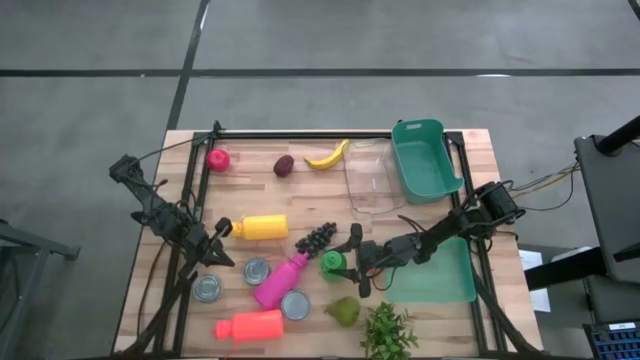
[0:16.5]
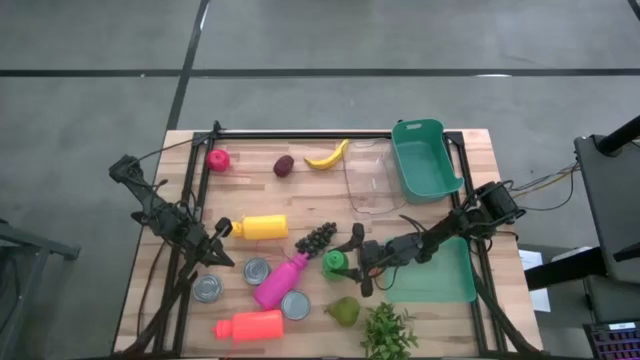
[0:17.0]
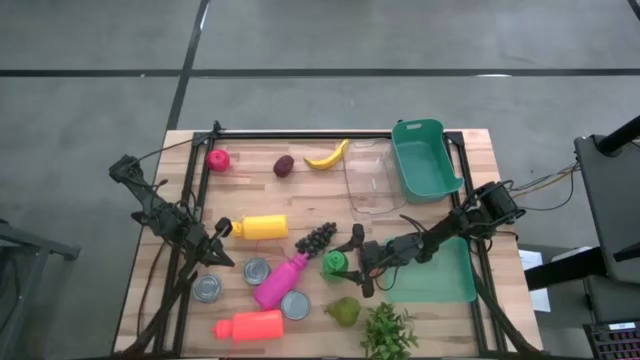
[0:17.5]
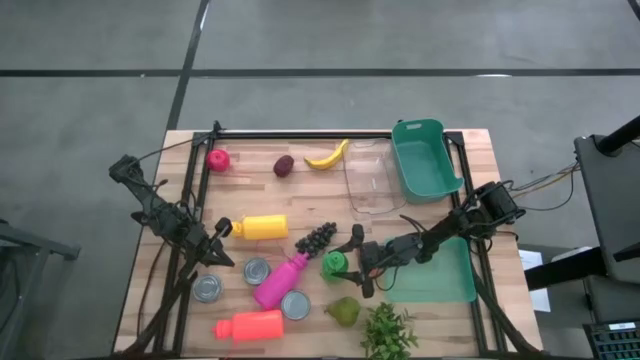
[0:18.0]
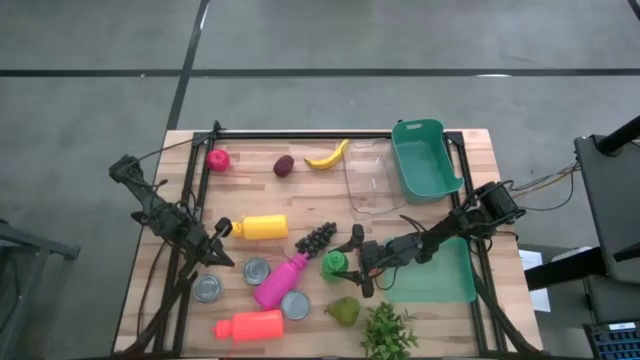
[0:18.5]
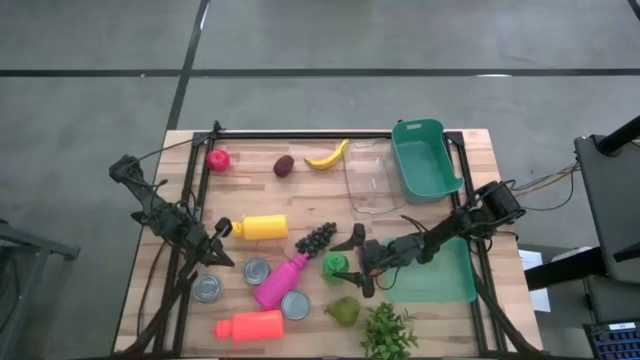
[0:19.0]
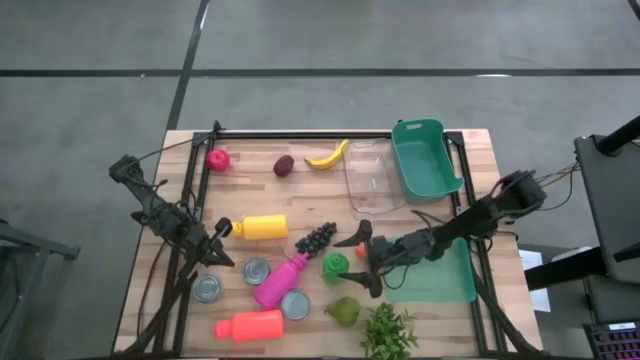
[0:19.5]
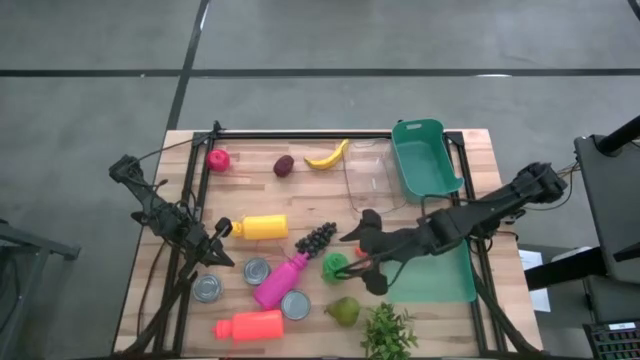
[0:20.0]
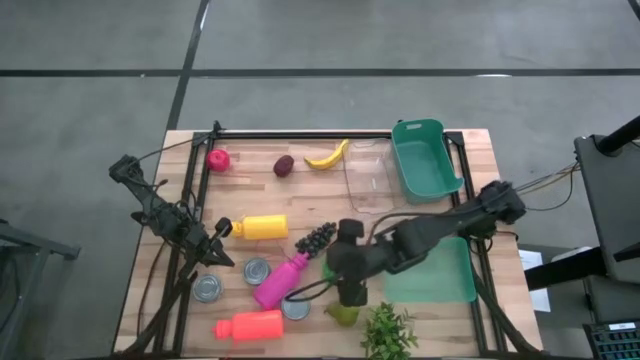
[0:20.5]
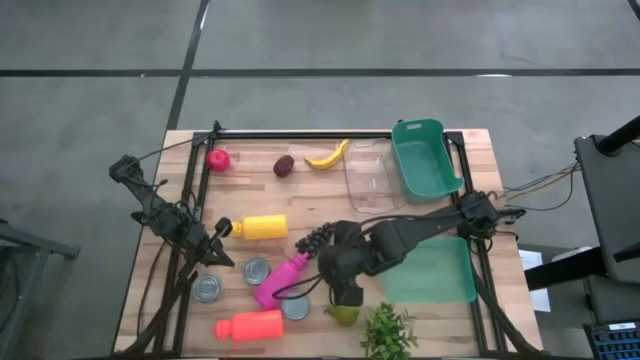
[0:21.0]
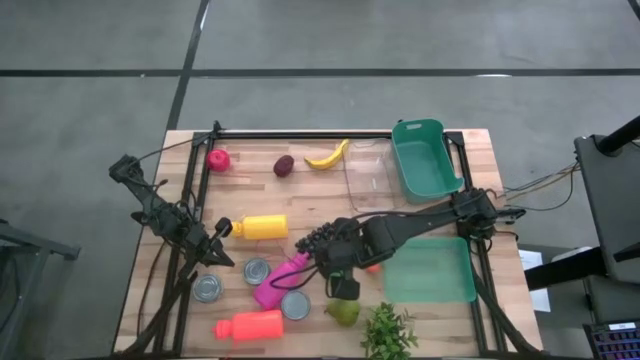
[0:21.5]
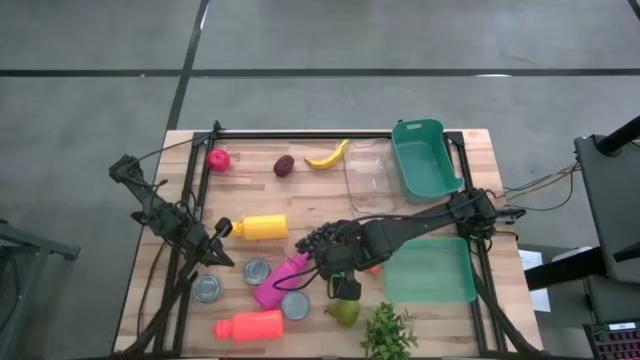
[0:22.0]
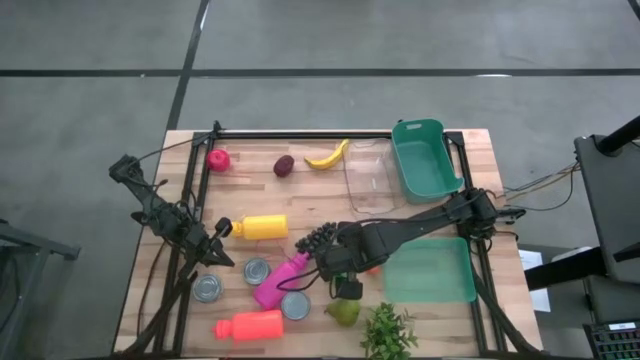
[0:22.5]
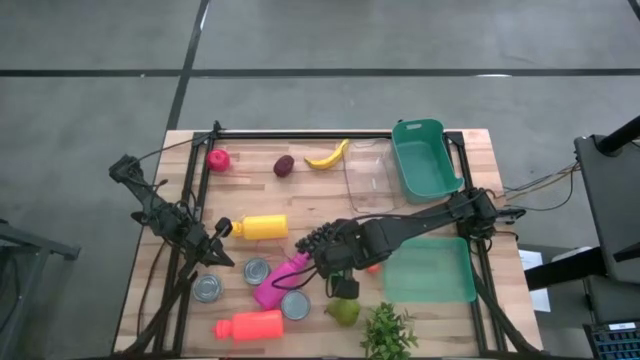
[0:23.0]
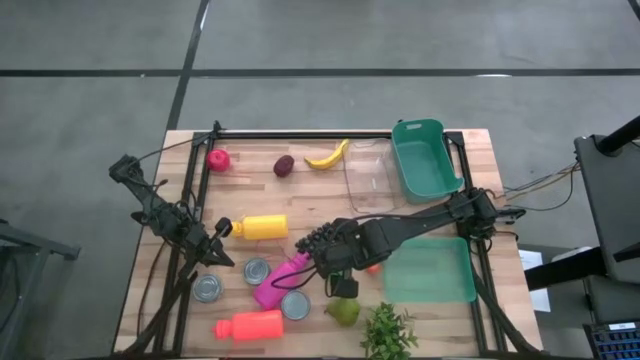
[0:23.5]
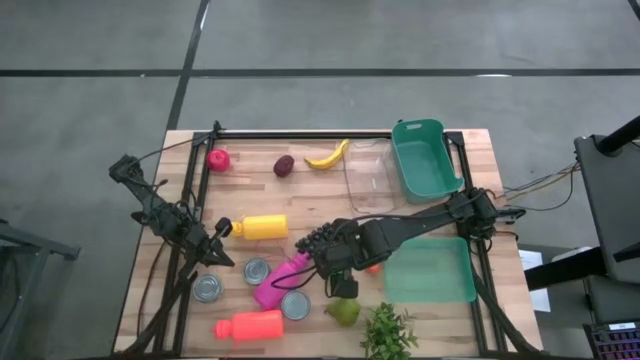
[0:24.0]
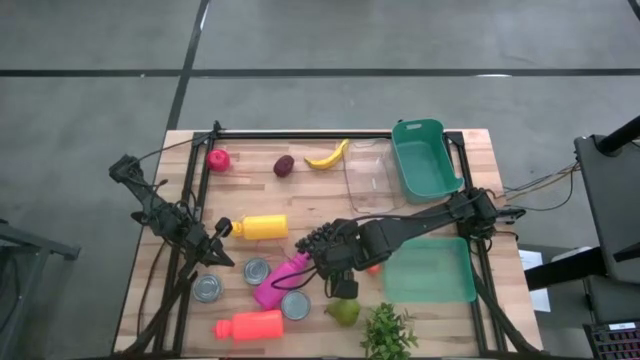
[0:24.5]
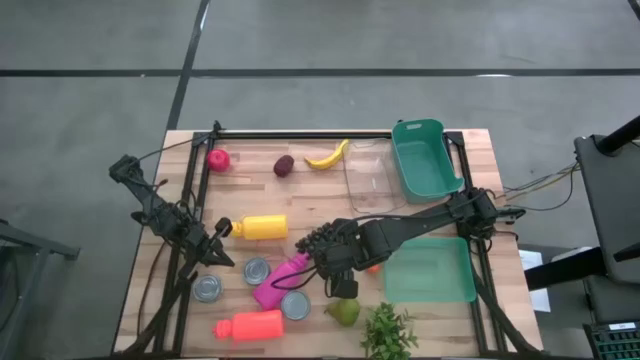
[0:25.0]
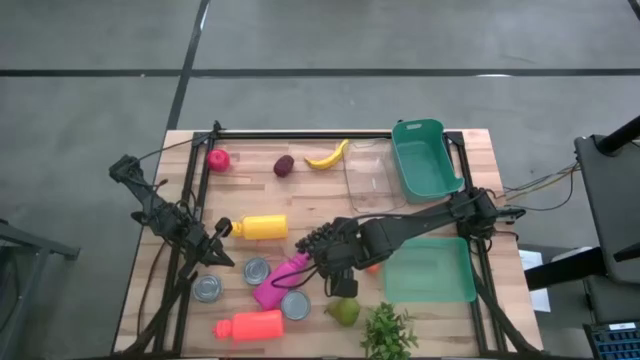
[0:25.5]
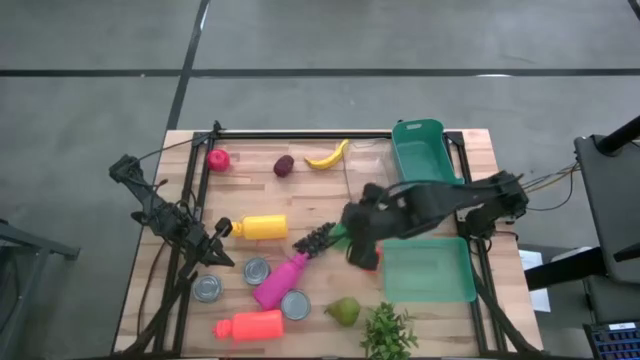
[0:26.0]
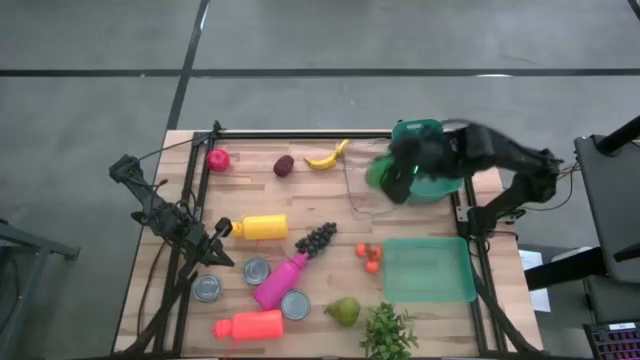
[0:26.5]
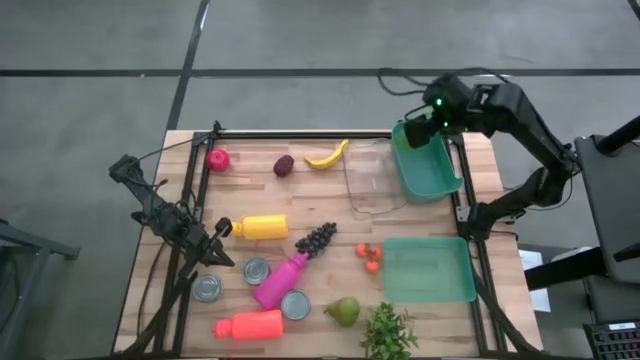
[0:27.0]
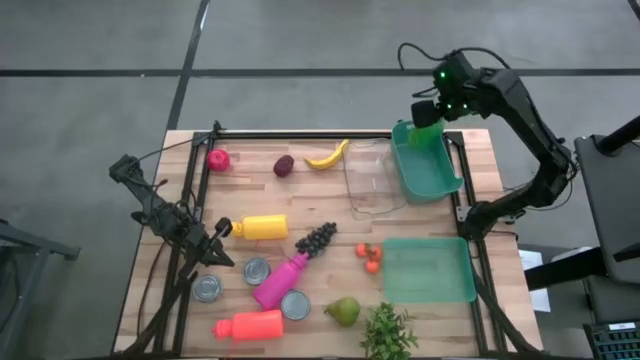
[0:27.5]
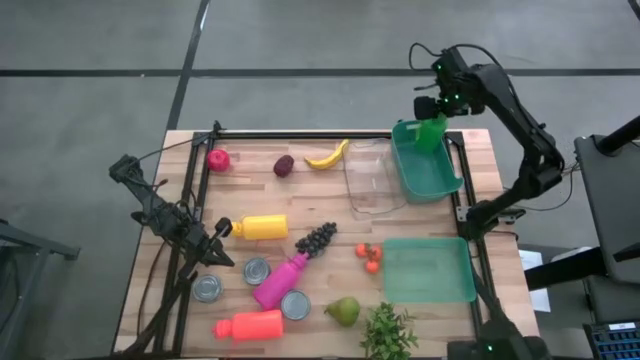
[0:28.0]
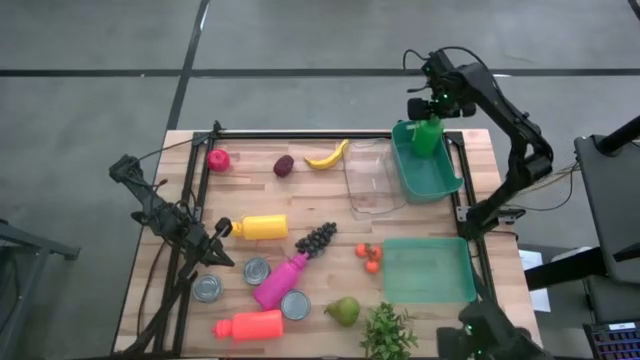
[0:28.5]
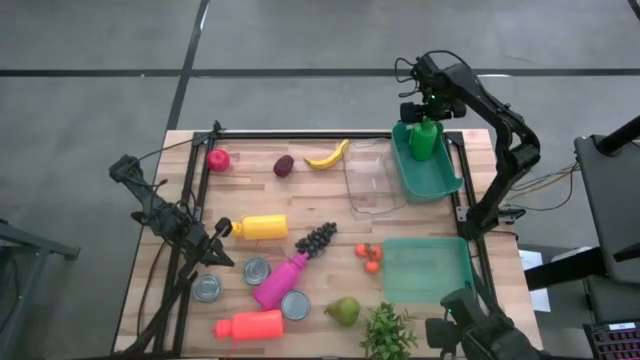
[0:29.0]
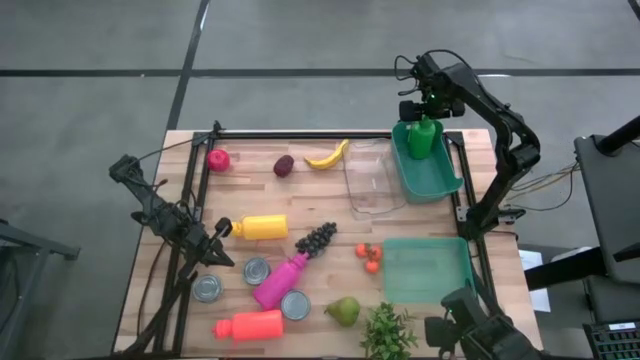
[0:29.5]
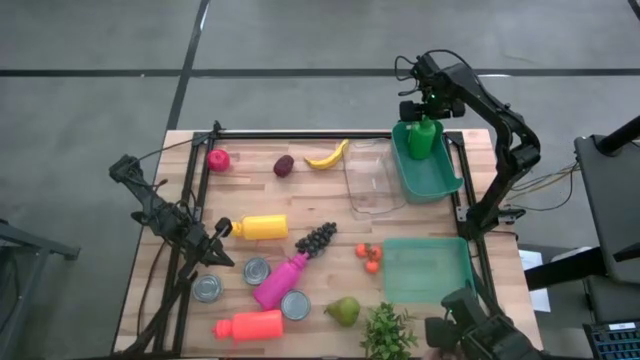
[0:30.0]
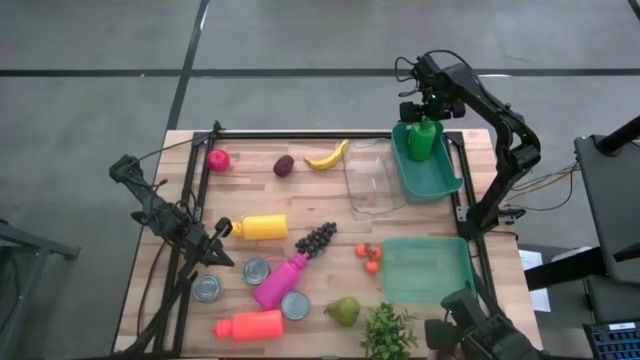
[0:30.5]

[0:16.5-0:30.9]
Task: Pick & Place Food Item
Put the green water bottle into the green bin

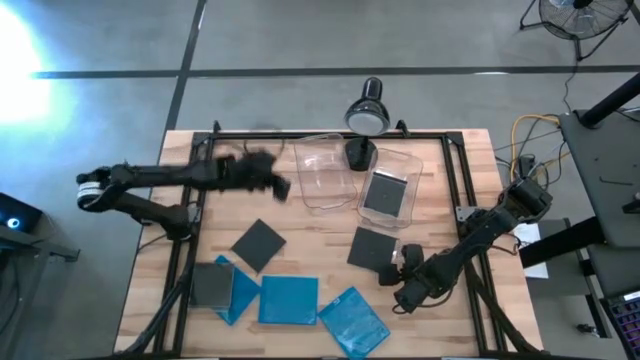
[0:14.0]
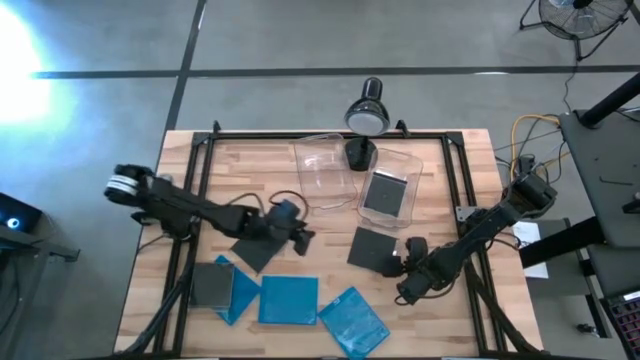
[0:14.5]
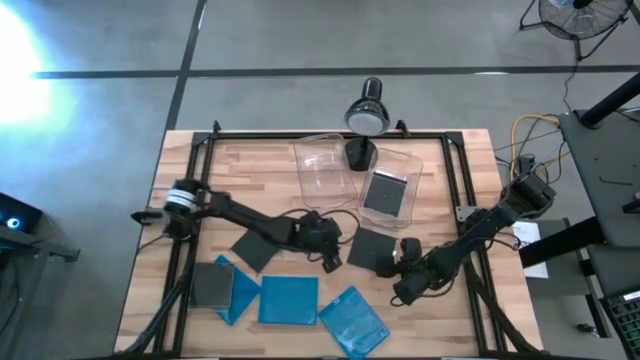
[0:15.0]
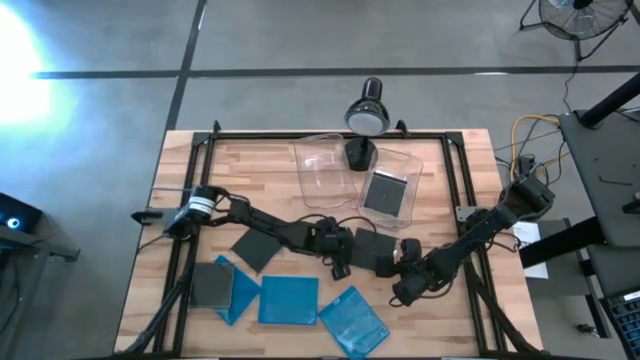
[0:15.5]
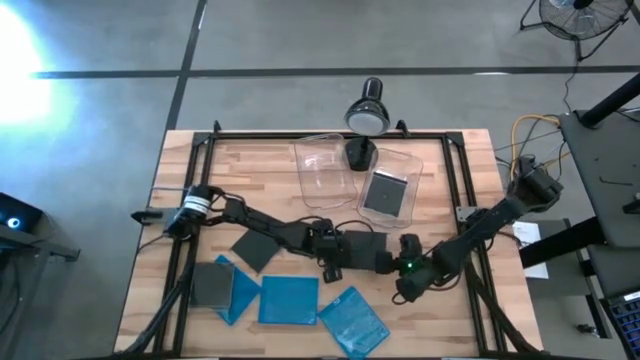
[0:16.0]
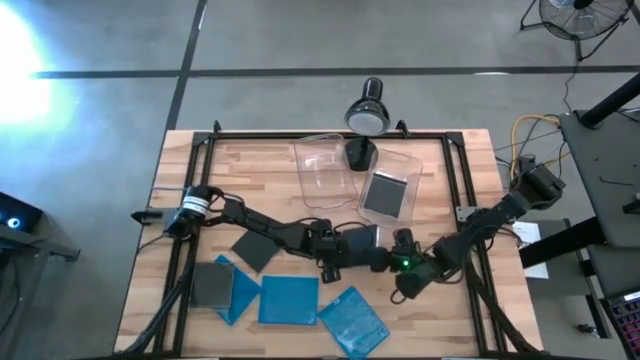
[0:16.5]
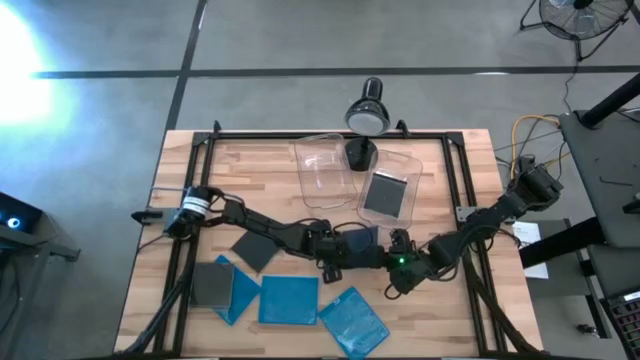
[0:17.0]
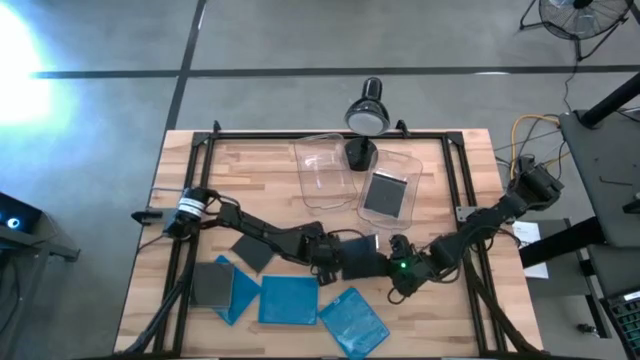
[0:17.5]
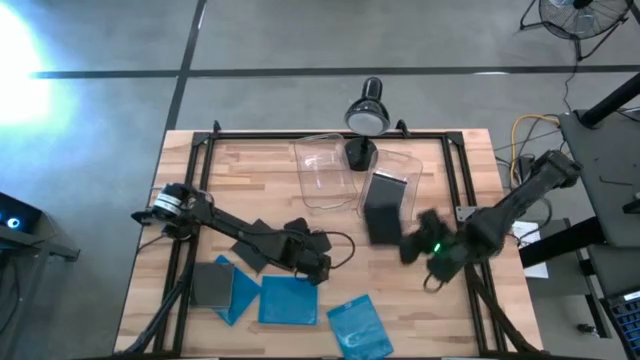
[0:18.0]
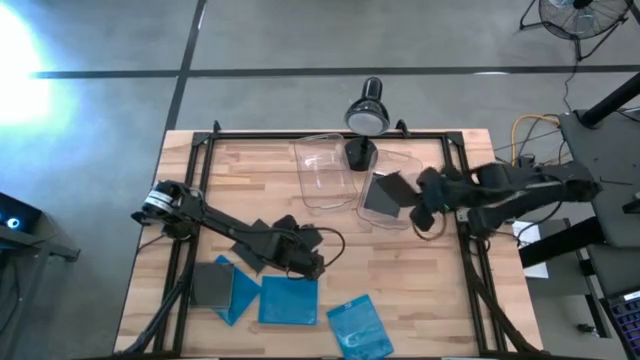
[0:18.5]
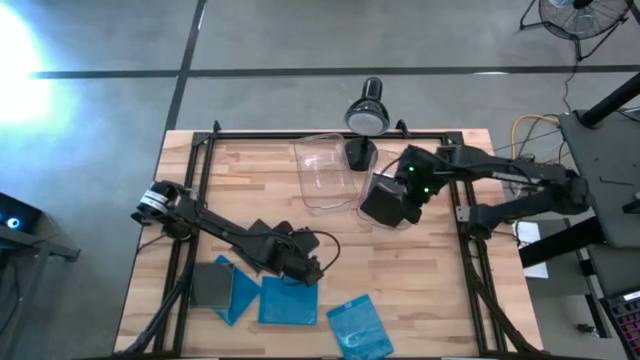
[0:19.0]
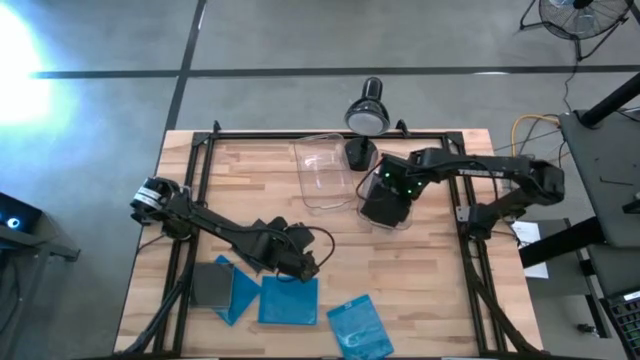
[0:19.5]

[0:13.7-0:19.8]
Task: Pick & place jewel cases by type
Put the black CD case into the right transparent bin
